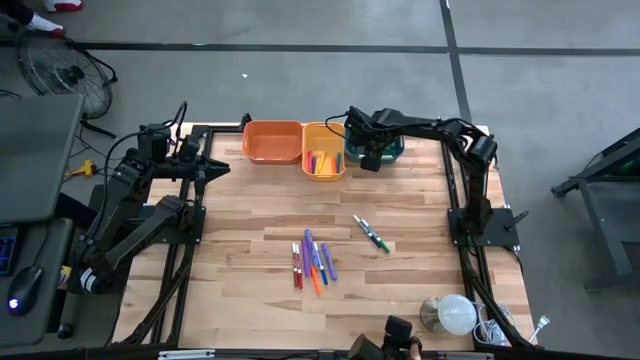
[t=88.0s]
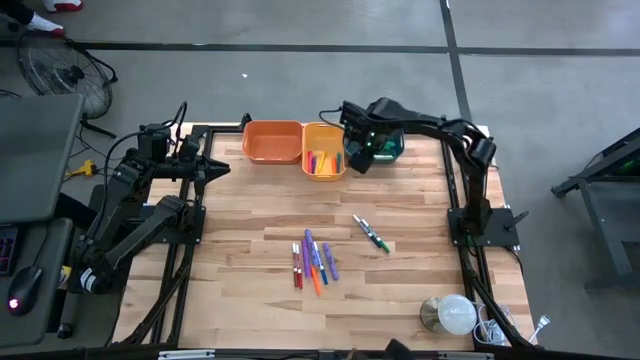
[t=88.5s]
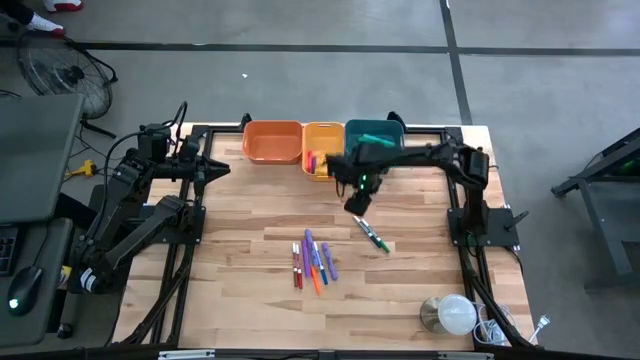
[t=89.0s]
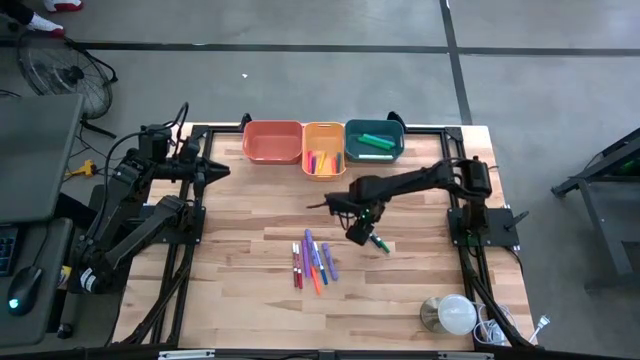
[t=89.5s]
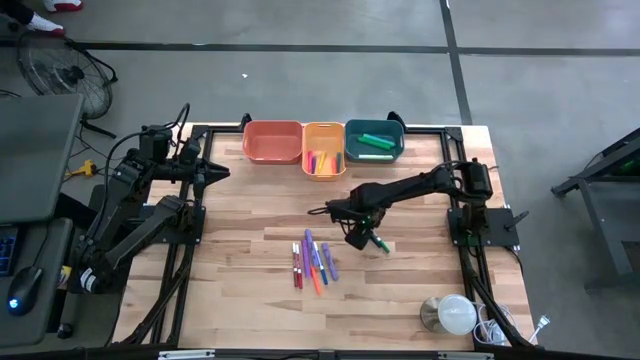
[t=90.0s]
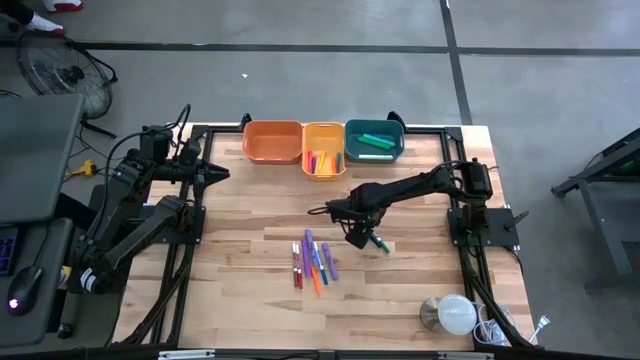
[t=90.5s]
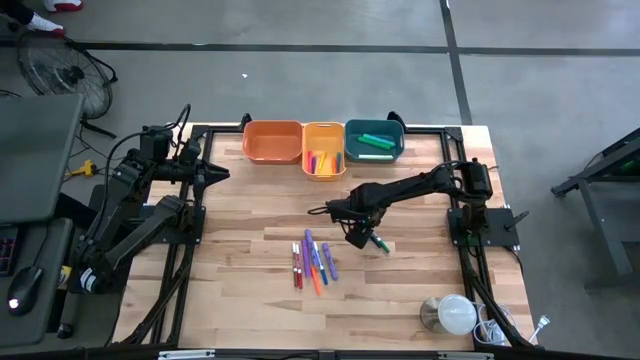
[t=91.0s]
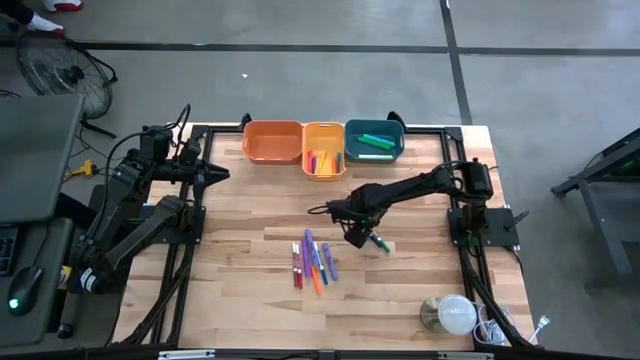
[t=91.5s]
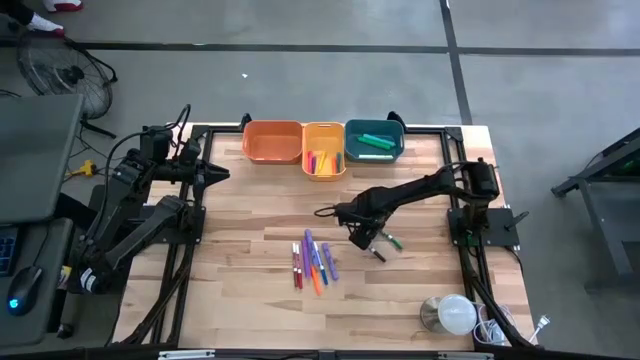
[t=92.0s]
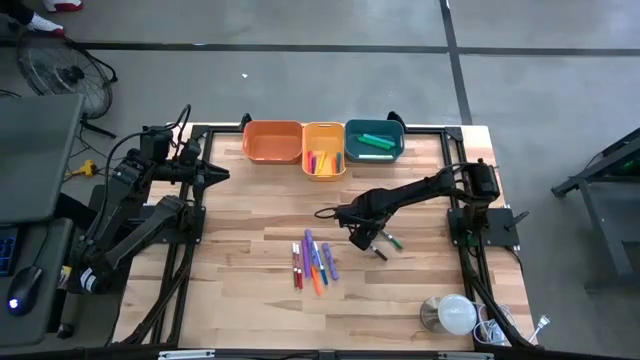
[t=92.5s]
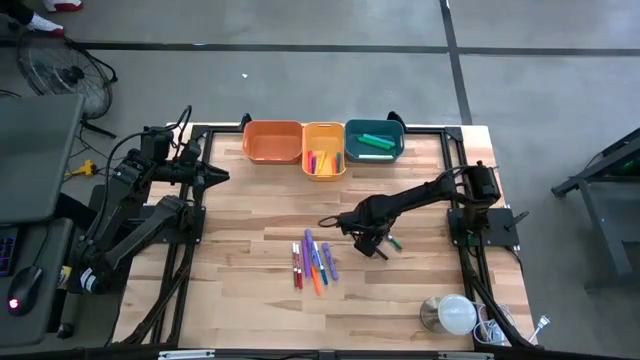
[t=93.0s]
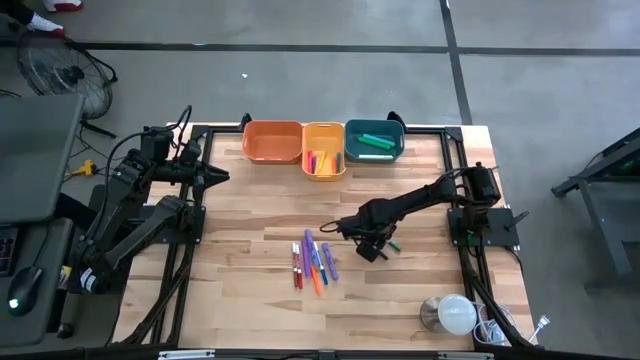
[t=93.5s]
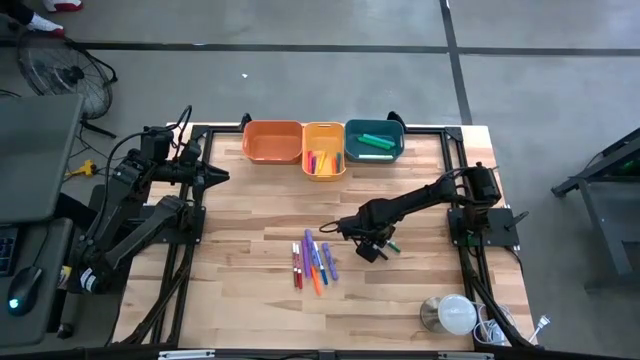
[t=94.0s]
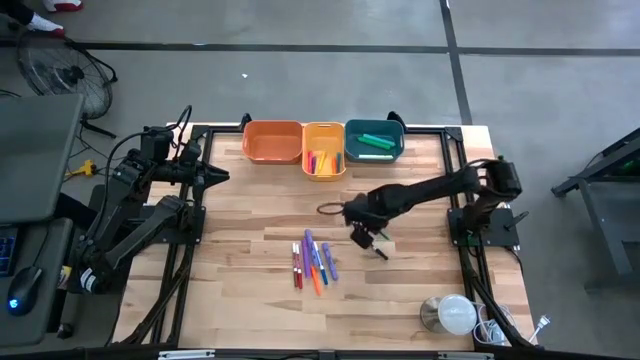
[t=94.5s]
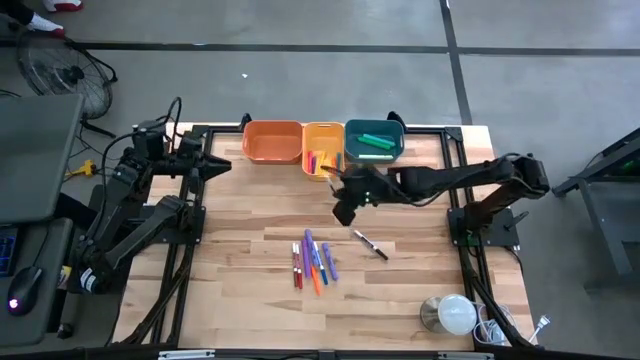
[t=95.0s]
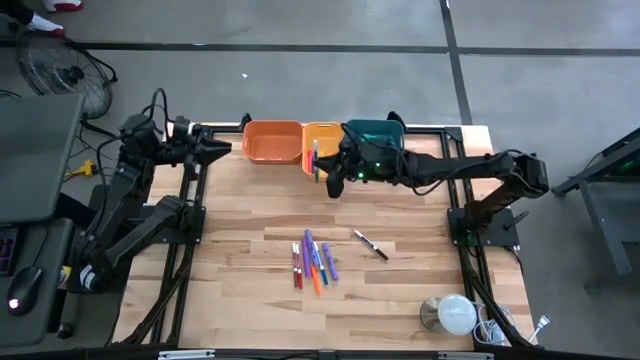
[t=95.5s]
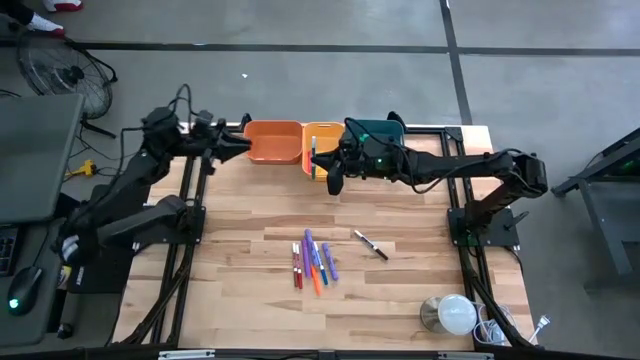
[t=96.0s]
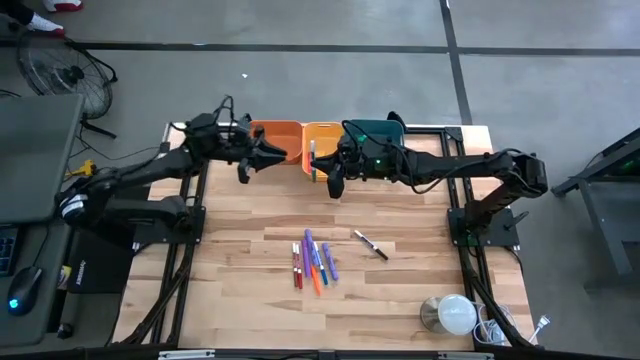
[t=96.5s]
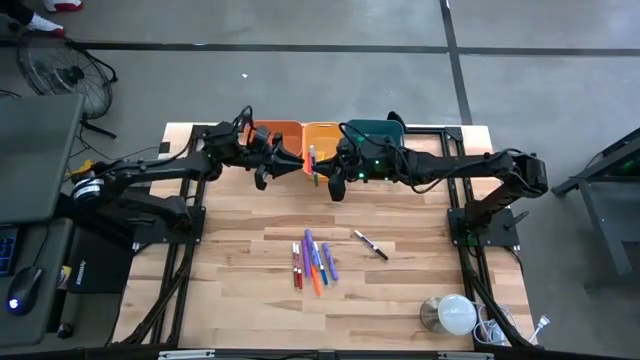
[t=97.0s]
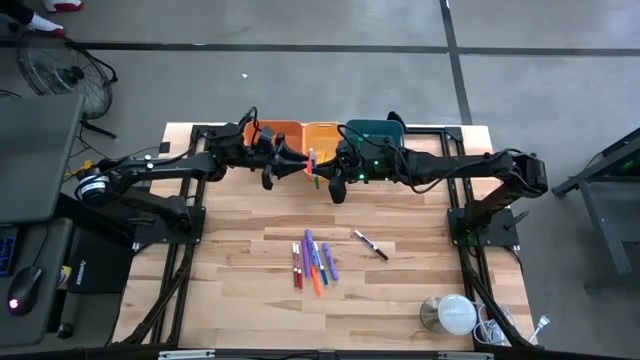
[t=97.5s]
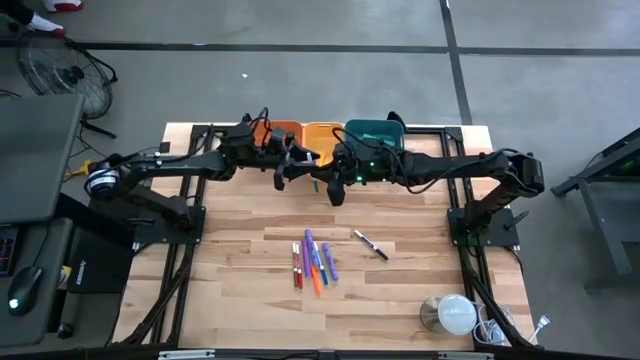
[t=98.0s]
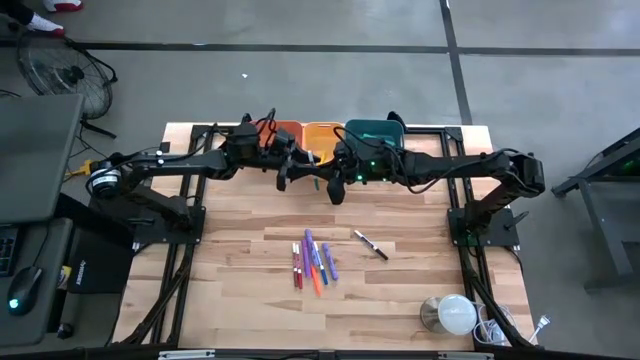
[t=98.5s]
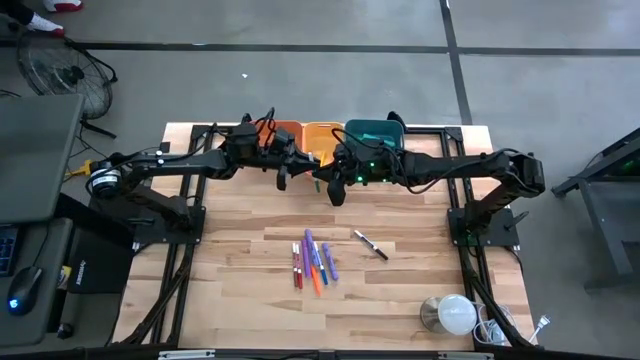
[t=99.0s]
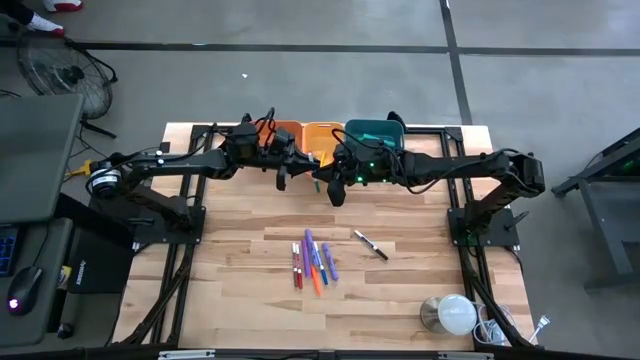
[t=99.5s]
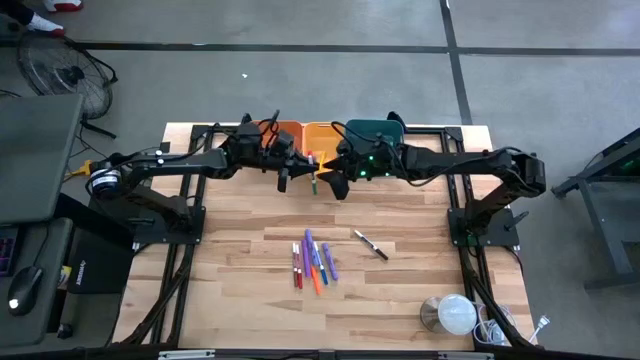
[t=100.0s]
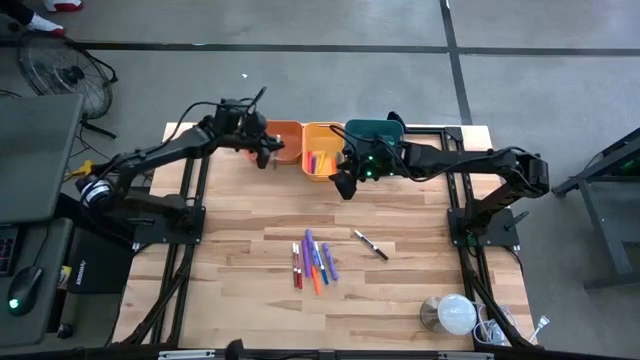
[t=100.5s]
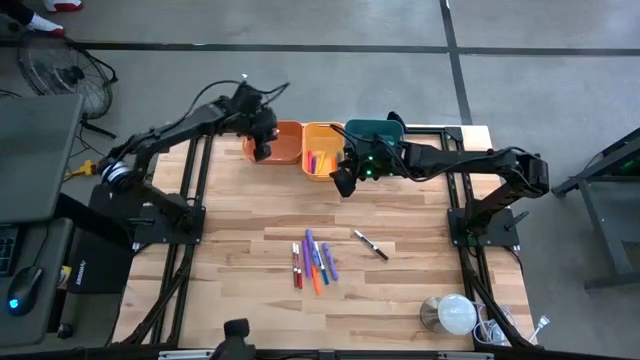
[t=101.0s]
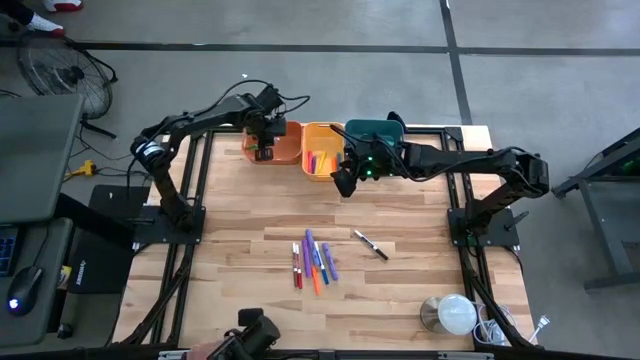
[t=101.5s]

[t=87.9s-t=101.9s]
Task: Pick & Place Markers
Put the green marker into the orange bin

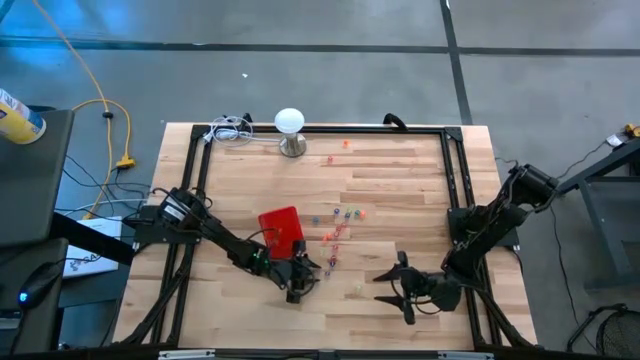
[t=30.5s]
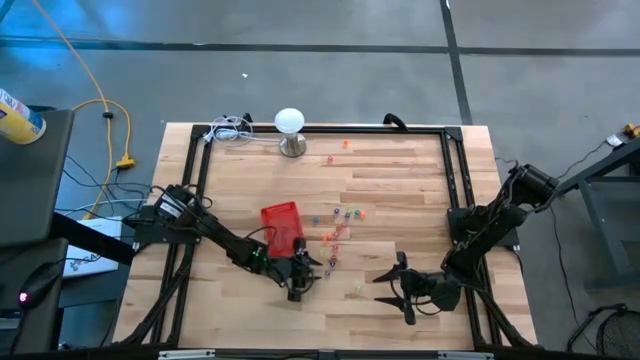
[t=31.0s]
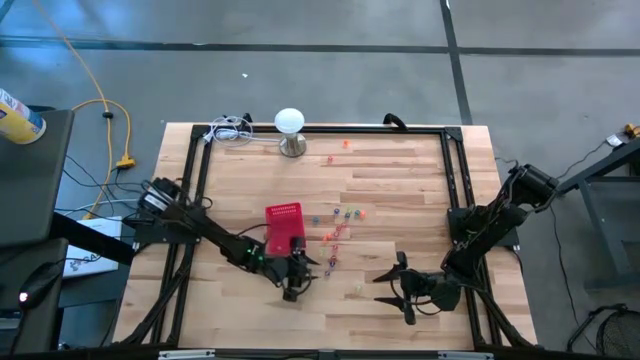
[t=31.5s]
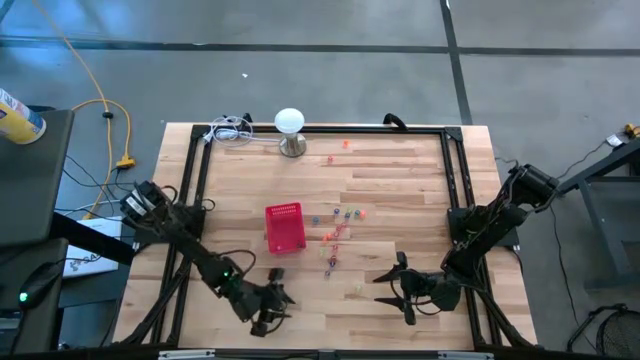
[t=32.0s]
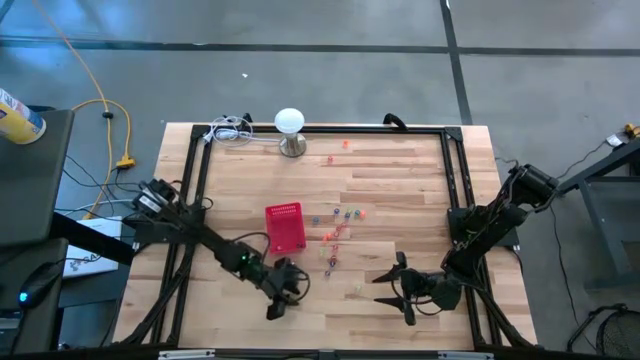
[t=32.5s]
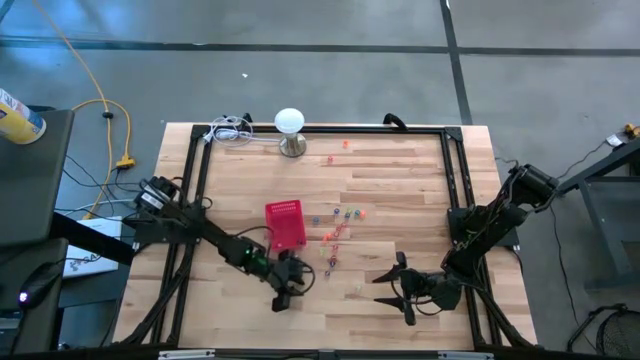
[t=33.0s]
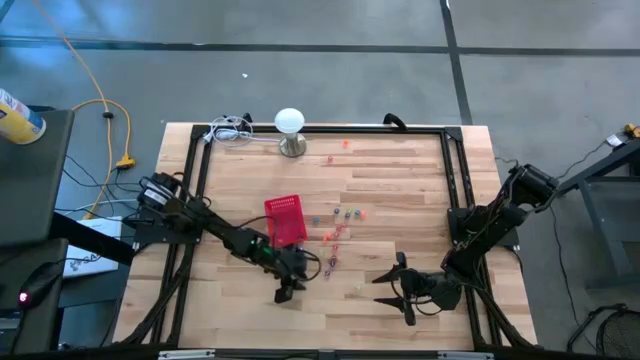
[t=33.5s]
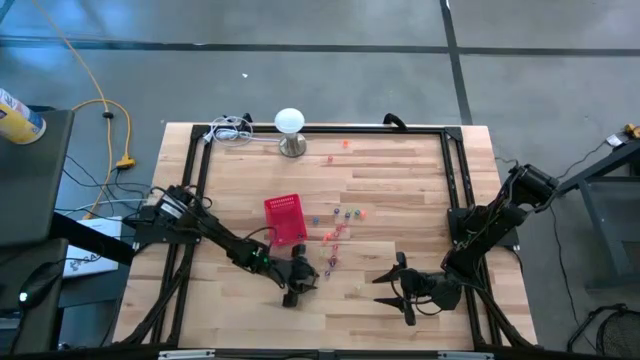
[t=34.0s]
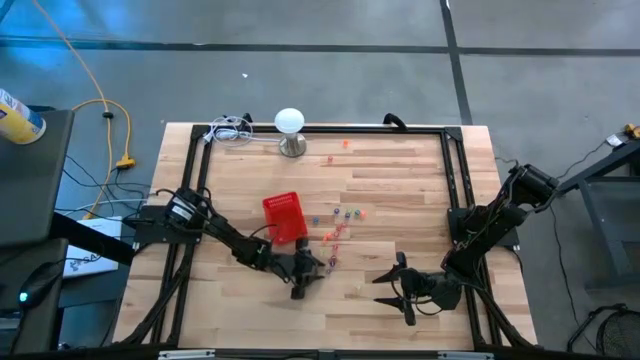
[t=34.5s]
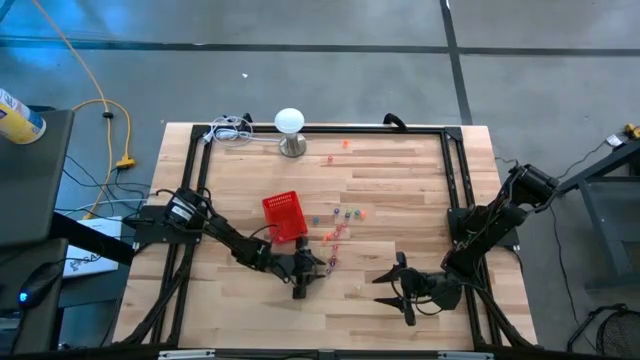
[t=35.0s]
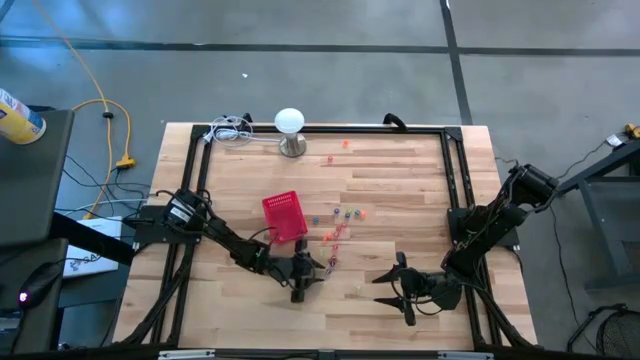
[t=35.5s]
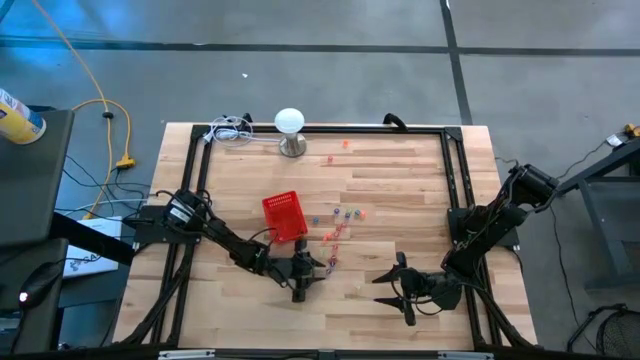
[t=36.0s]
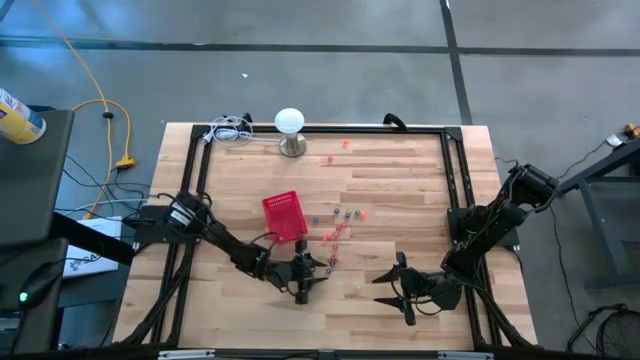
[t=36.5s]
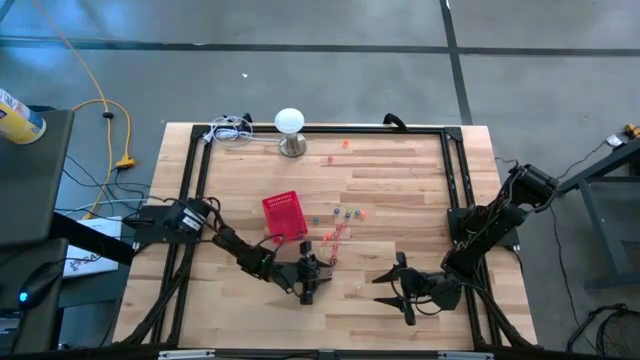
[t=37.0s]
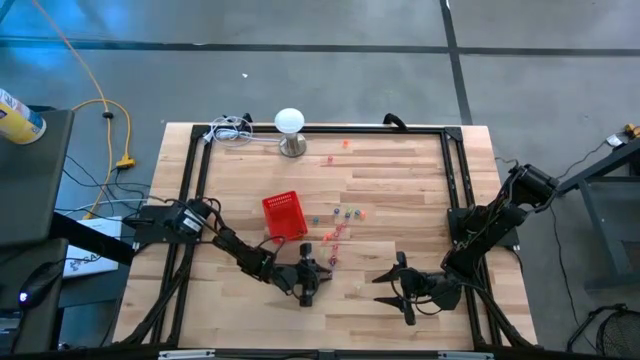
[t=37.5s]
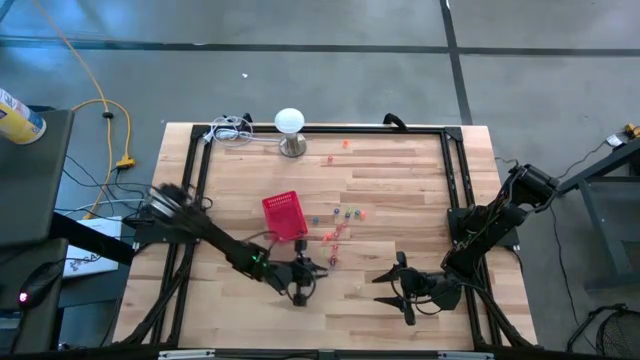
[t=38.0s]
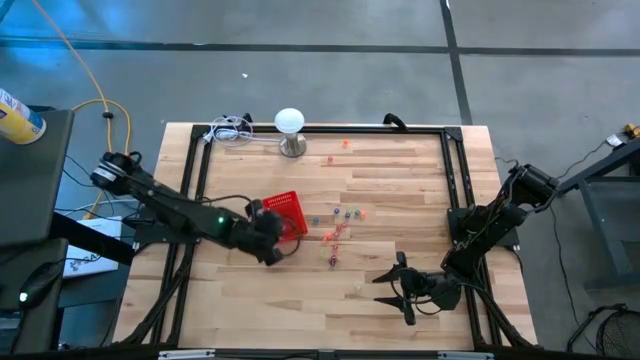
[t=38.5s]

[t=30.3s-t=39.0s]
Task: Pick & Place Dice
Put the purple die into the red basket
